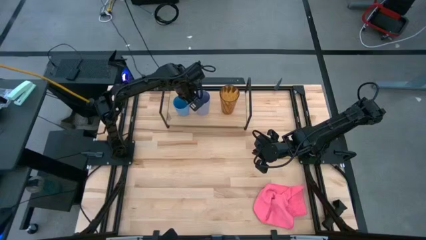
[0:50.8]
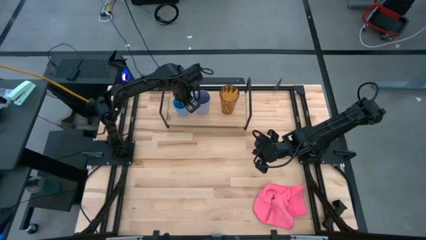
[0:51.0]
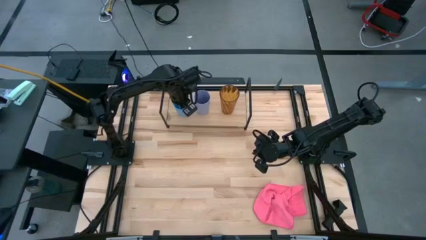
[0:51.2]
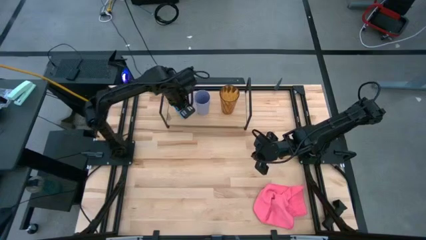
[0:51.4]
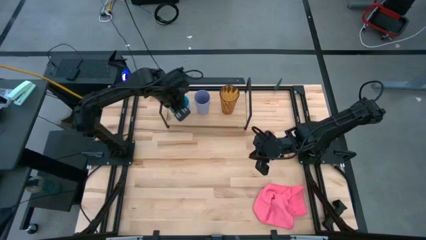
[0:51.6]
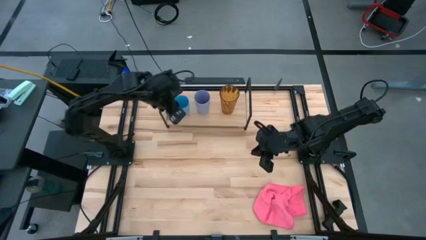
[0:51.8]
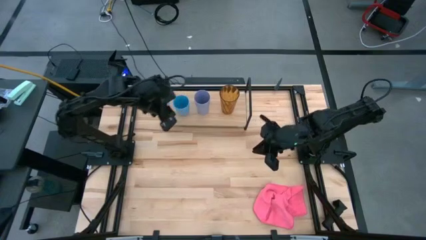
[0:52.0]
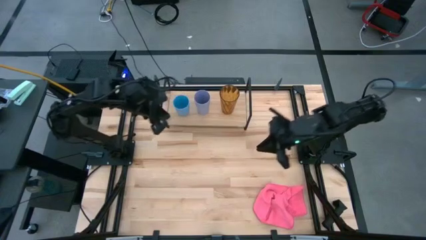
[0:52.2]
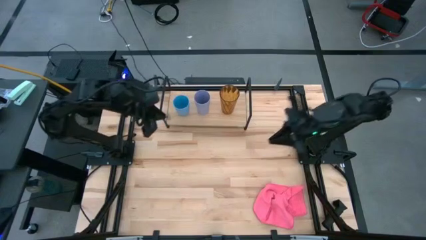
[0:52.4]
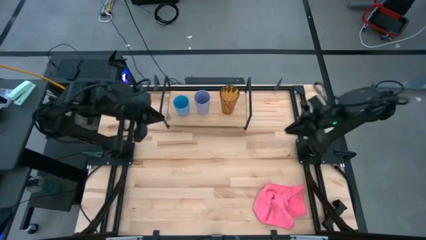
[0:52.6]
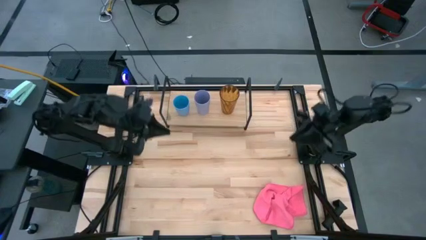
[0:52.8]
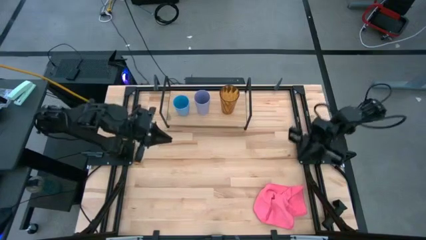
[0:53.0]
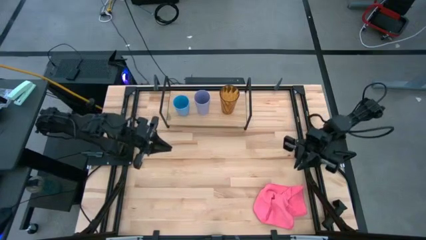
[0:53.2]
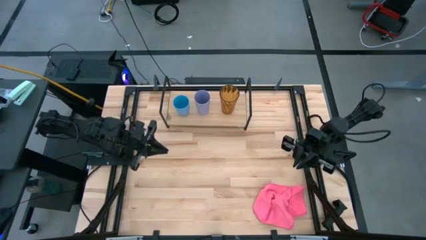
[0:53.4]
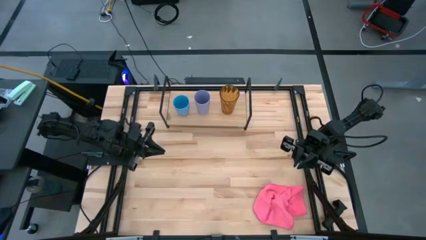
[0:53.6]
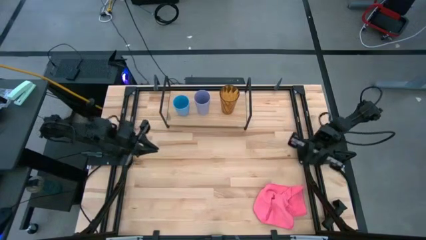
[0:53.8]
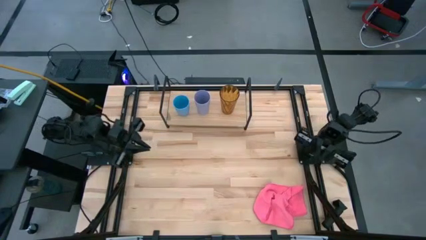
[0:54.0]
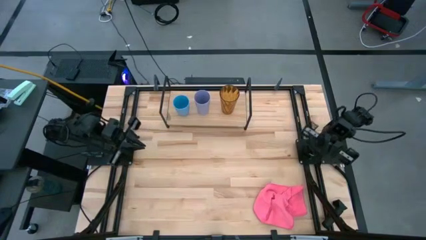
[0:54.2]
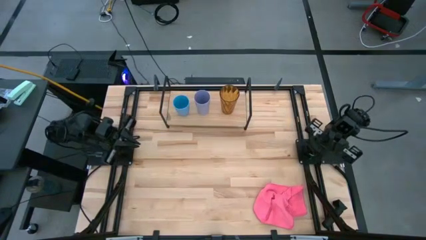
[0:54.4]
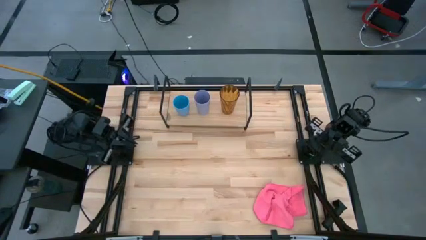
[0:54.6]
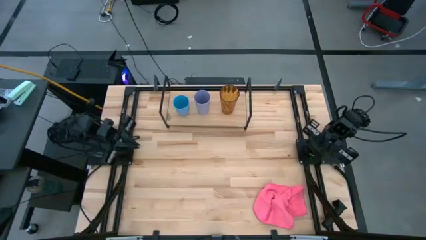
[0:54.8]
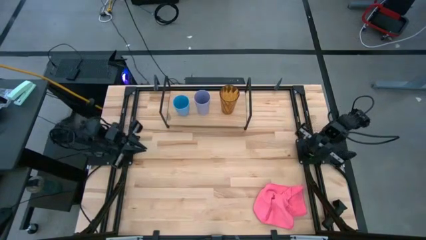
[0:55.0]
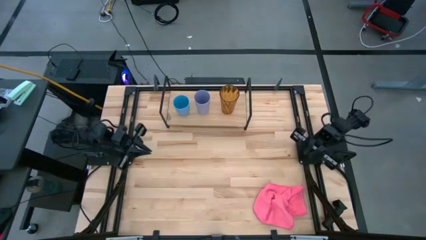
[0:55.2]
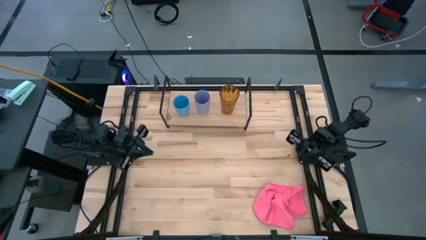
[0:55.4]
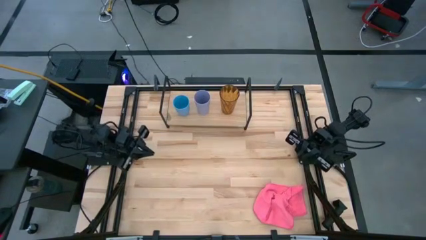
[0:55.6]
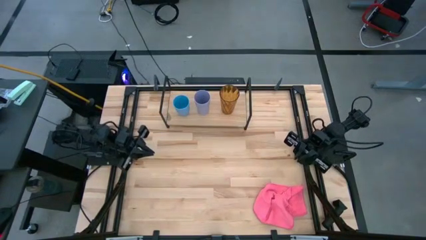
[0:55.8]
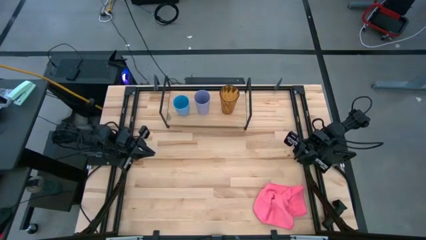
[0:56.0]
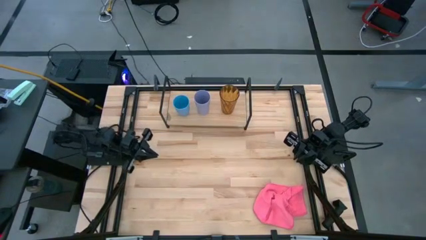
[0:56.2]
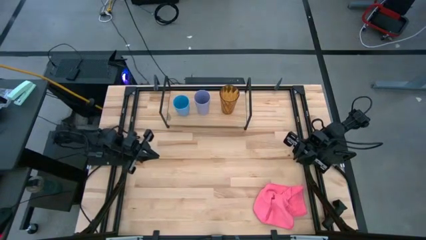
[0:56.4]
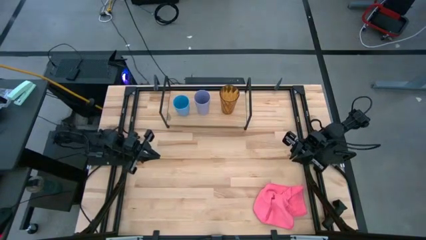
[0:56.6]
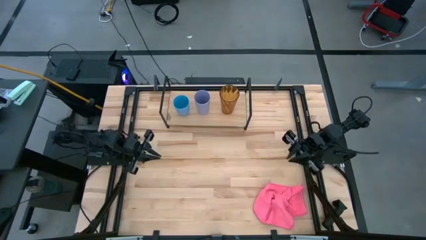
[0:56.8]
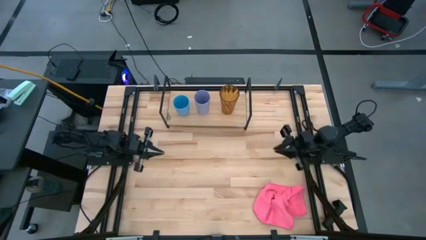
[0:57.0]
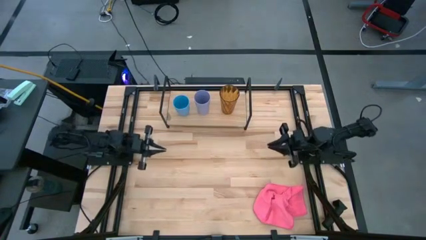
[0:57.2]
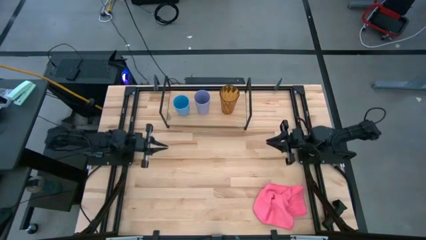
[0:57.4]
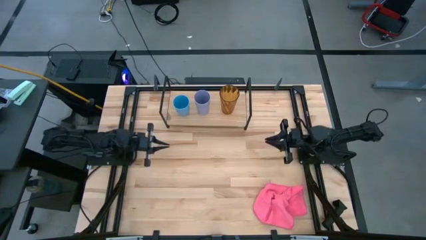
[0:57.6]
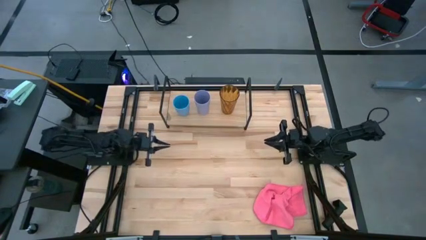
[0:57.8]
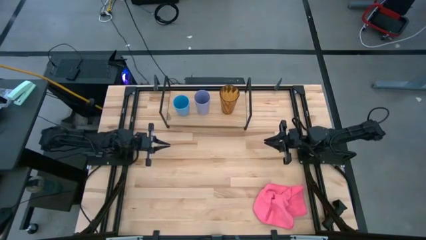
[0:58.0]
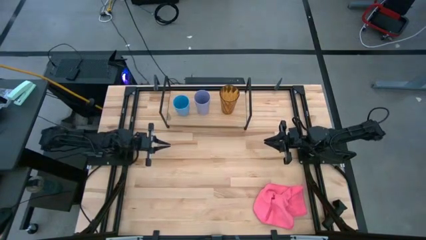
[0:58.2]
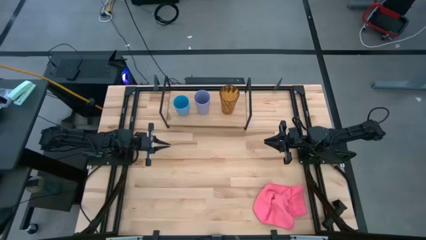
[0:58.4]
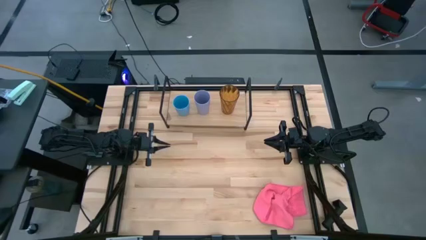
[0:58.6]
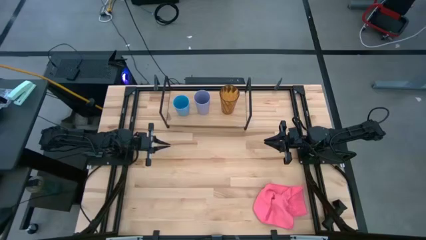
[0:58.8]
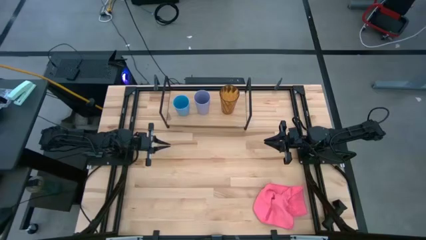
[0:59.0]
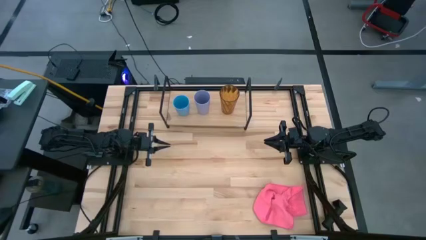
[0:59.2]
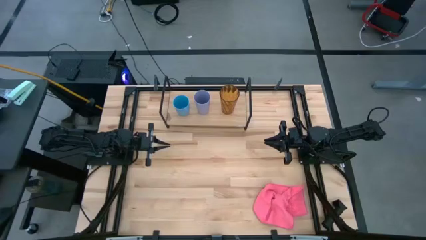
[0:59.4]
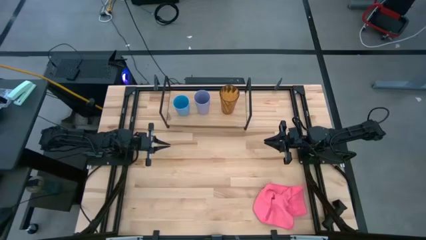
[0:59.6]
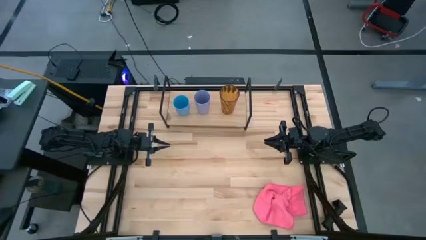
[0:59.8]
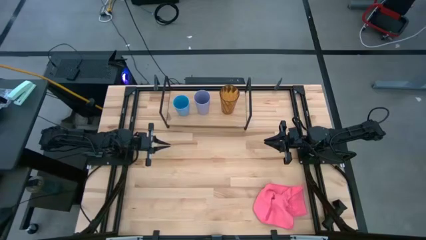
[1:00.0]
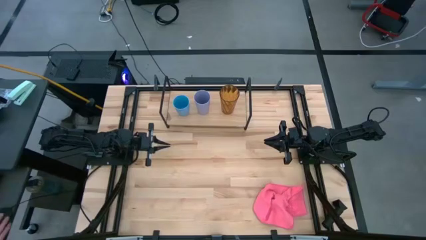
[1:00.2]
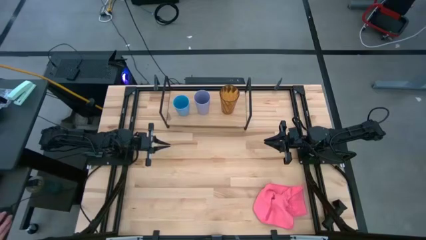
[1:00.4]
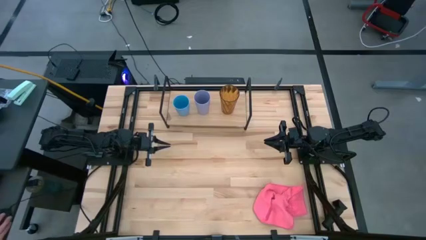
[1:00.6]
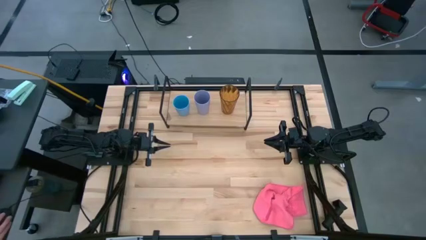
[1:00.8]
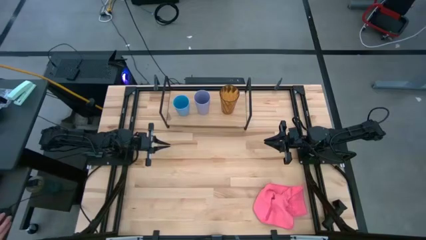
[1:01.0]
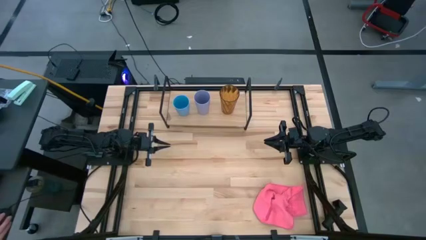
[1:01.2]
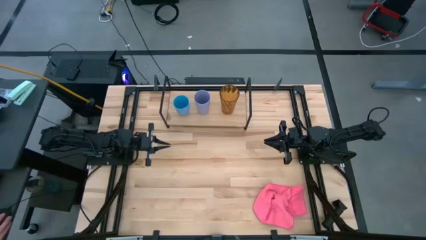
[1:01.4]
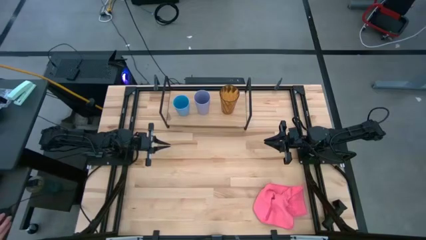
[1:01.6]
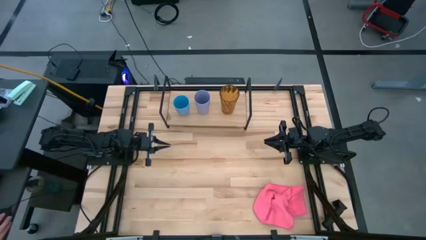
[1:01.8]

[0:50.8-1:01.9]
Task: Stack small to large cups/mugs on shelf
Return to Home Position

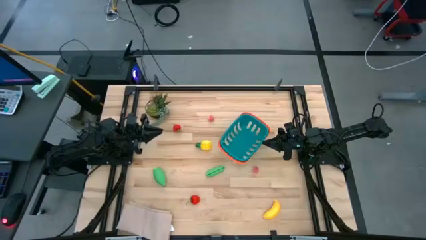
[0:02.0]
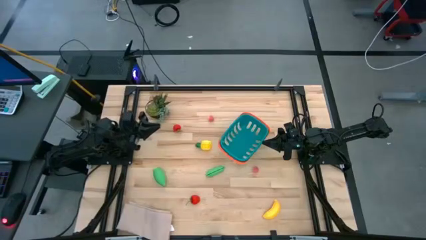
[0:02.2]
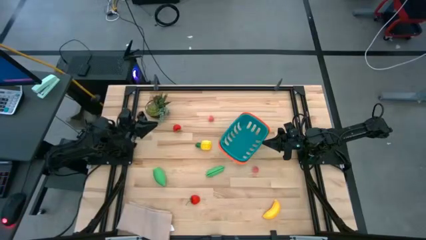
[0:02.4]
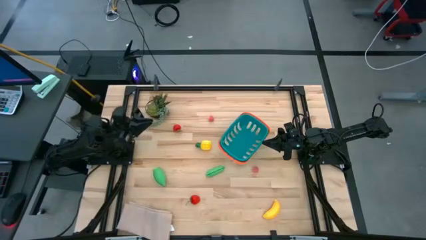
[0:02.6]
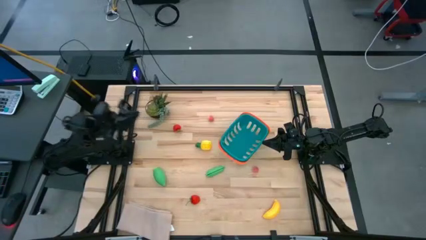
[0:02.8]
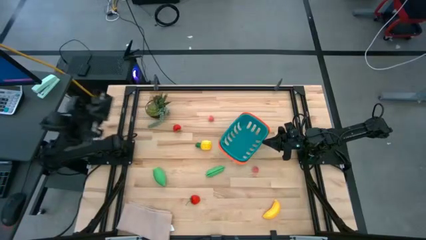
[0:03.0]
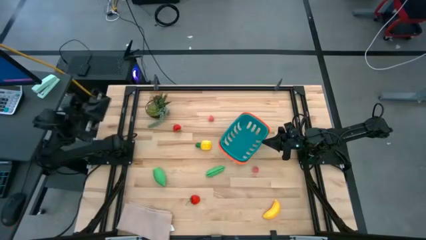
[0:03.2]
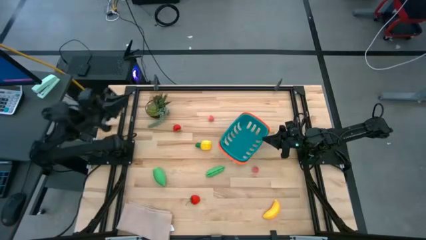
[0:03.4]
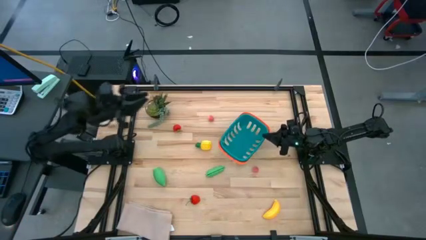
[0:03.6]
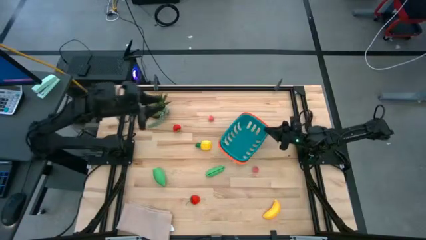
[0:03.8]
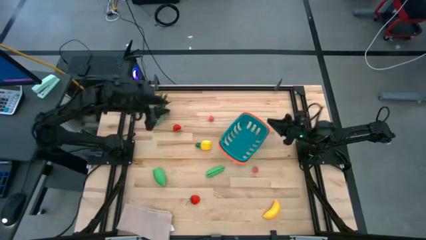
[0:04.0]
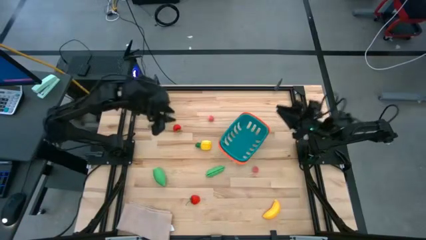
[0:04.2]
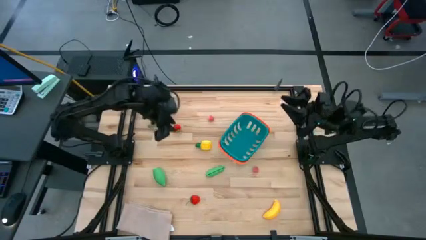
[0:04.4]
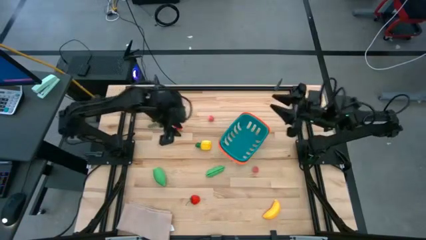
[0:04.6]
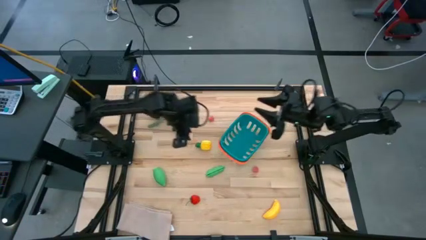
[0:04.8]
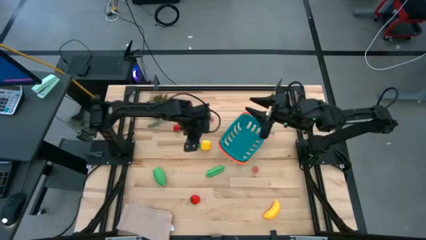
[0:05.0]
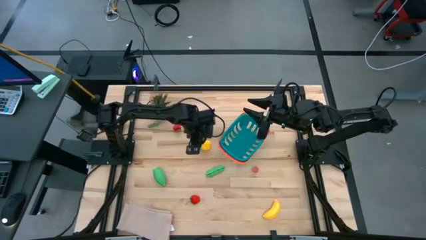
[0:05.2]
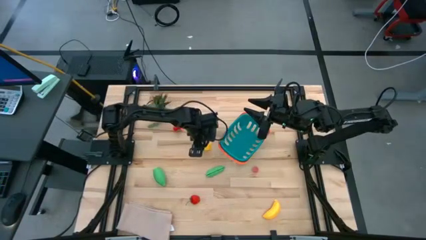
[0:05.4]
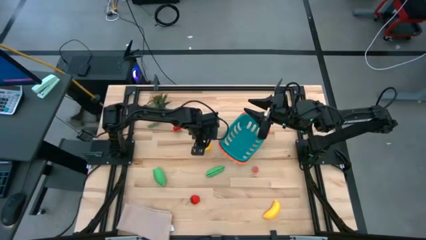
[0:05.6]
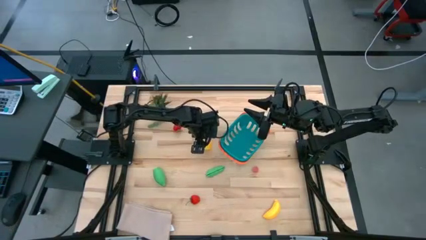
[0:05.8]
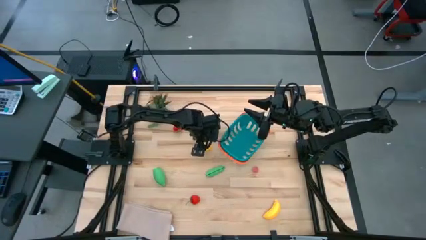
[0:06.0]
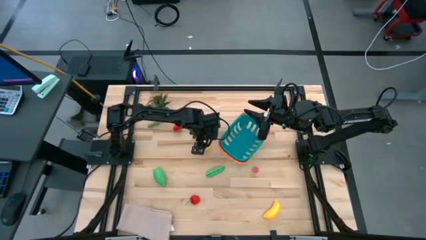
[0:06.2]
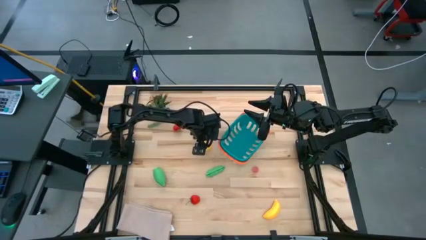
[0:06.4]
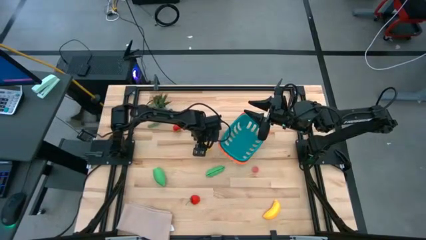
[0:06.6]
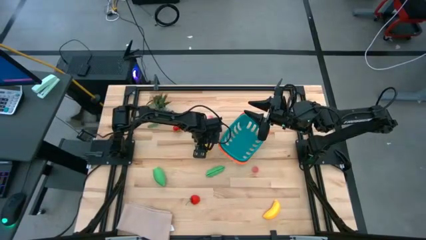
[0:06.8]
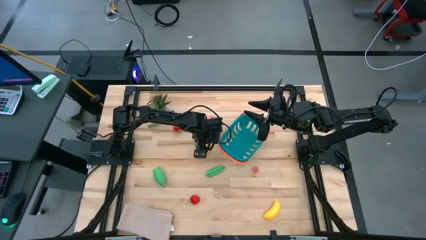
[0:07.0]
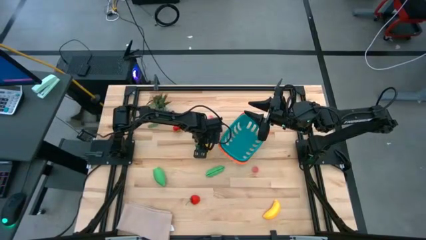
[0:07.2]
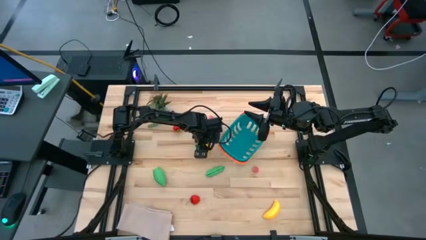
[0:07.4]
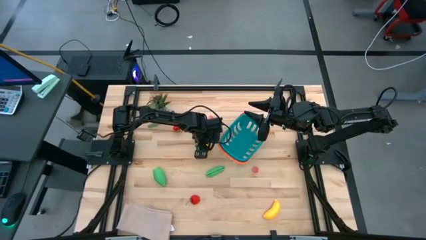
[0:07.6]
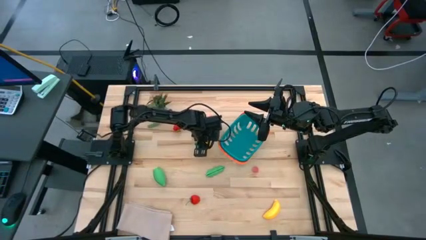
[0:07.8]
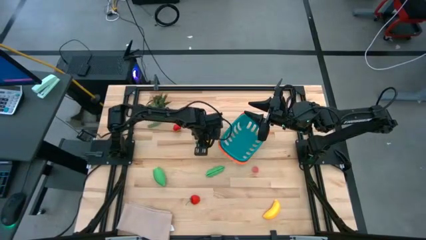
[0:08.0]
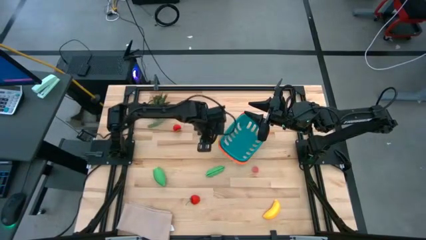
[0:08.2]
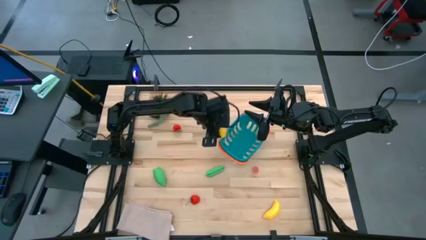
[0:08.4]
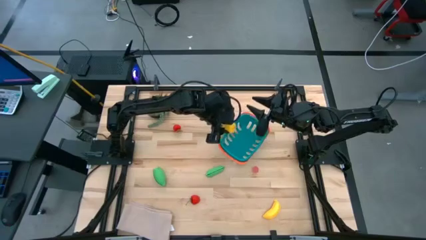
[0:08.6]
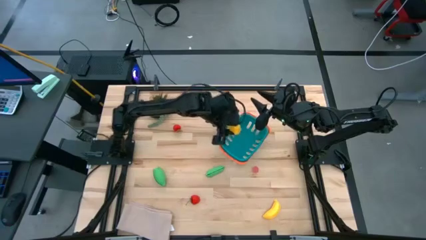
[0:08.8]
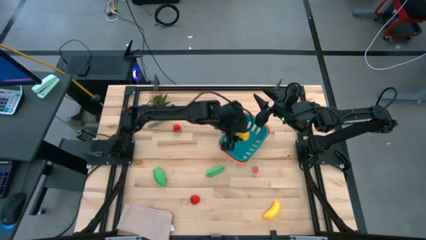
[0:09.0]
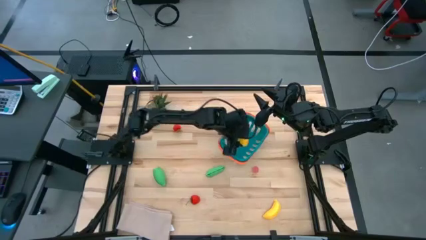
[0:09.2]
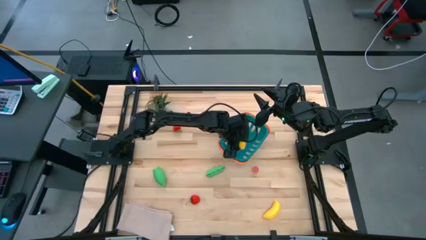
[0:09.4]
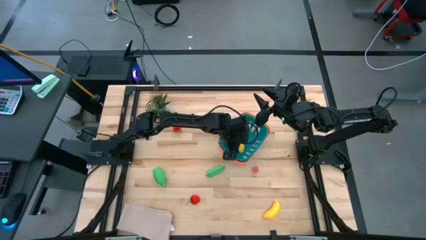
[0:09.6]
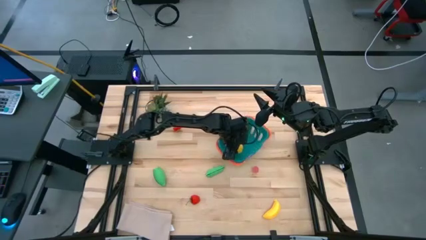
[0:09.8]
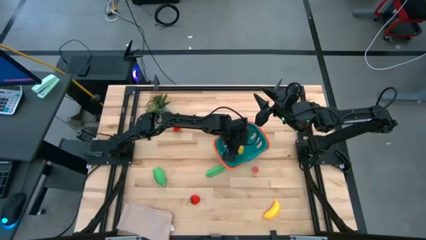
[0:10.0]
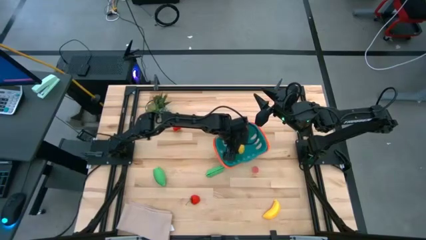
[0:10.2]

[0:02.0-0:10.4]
Task: Pick and placing Produce into tupperware
Put the yellow pineapple into the blue bin
